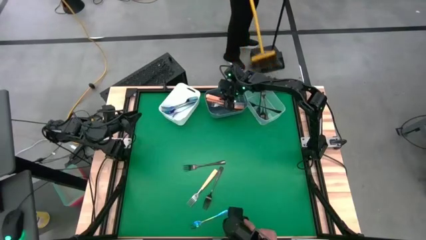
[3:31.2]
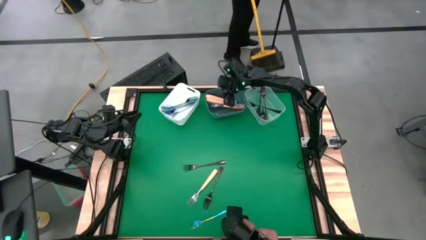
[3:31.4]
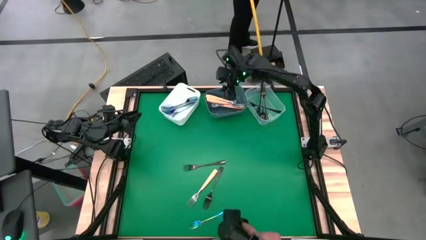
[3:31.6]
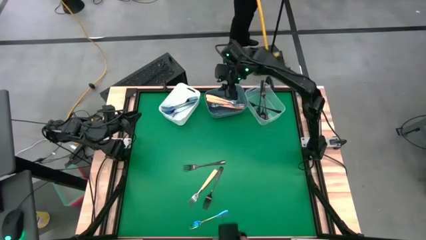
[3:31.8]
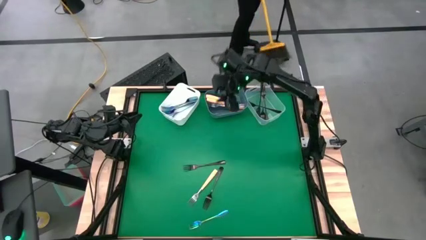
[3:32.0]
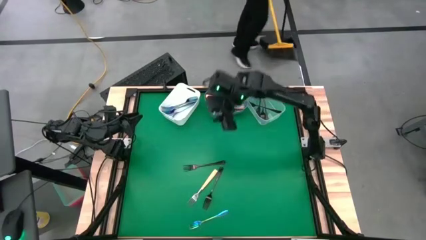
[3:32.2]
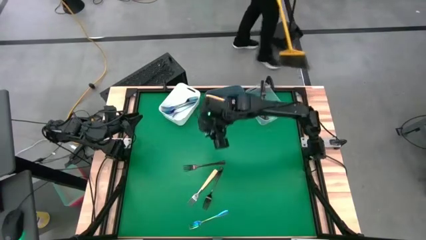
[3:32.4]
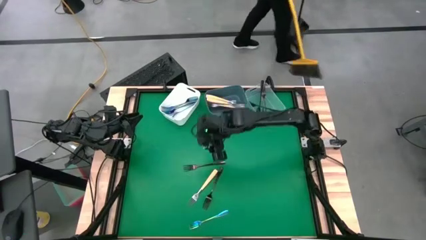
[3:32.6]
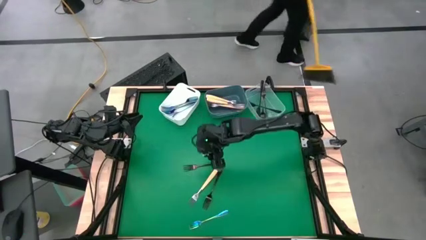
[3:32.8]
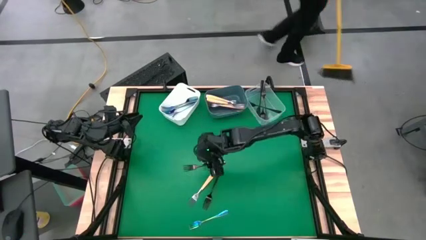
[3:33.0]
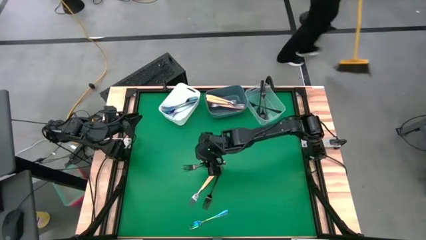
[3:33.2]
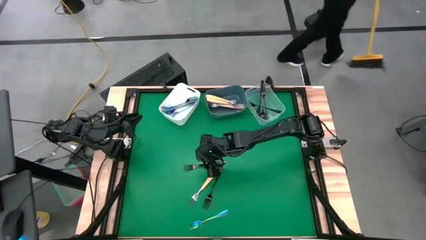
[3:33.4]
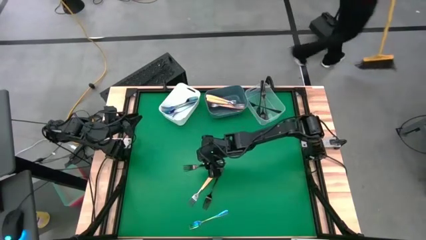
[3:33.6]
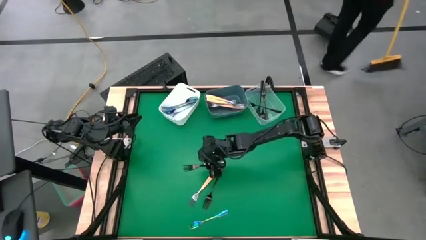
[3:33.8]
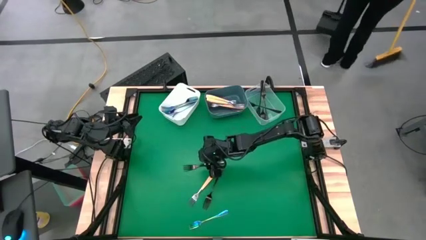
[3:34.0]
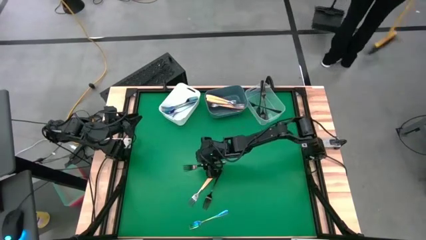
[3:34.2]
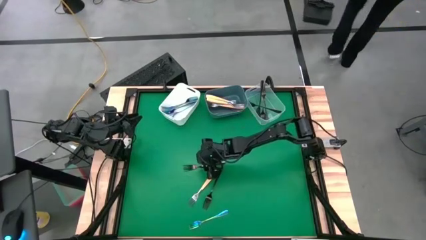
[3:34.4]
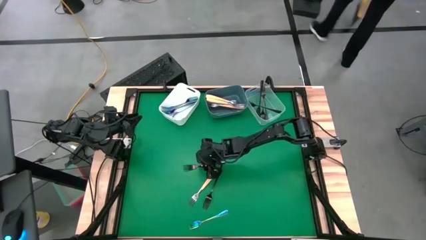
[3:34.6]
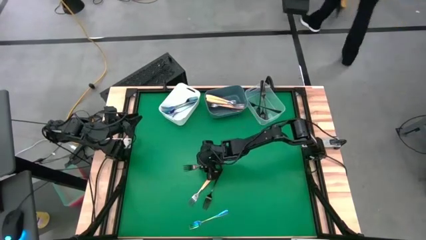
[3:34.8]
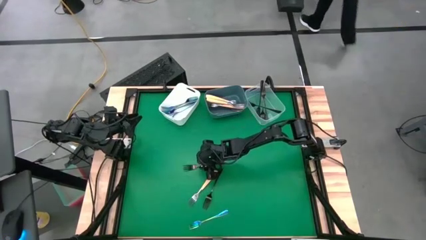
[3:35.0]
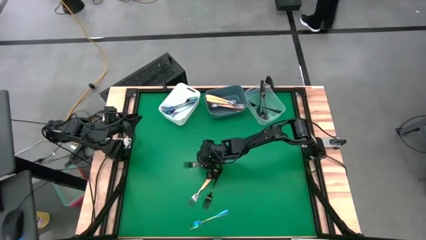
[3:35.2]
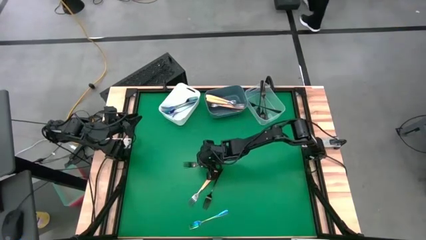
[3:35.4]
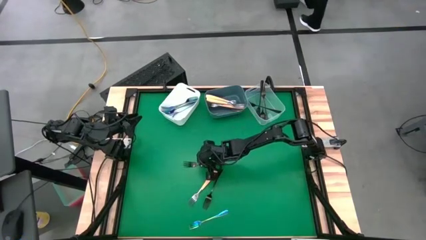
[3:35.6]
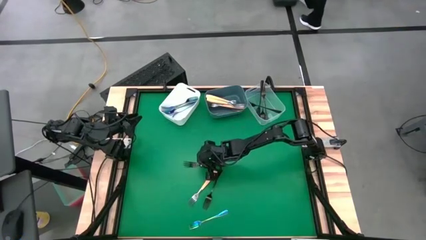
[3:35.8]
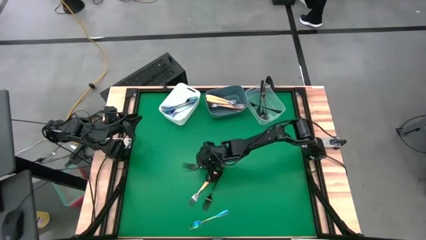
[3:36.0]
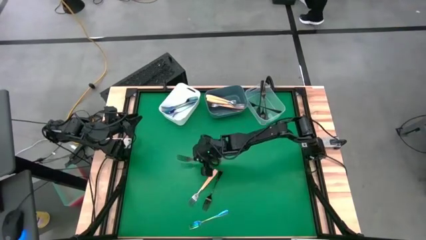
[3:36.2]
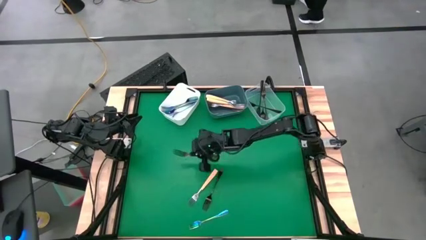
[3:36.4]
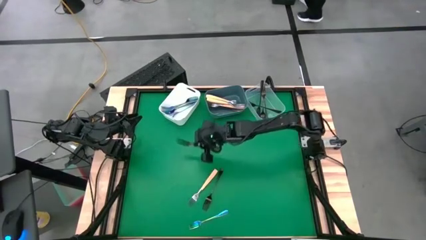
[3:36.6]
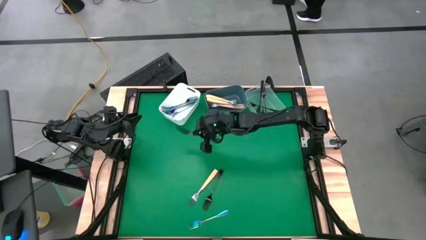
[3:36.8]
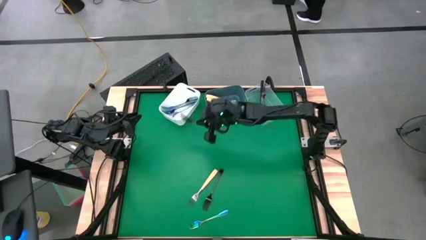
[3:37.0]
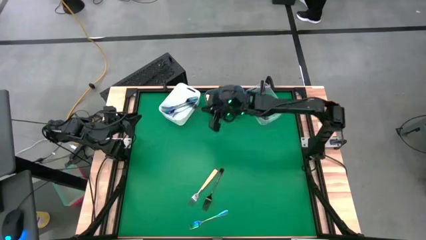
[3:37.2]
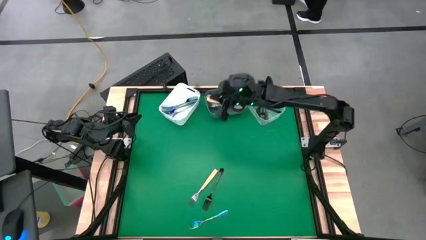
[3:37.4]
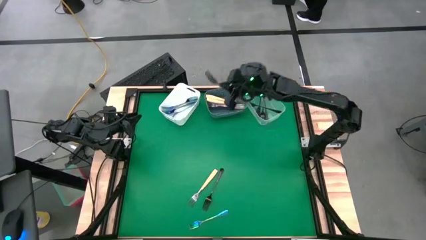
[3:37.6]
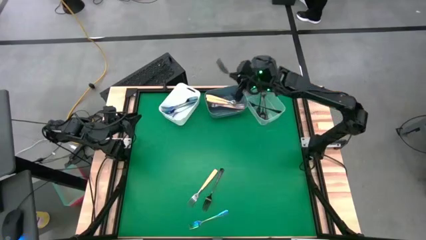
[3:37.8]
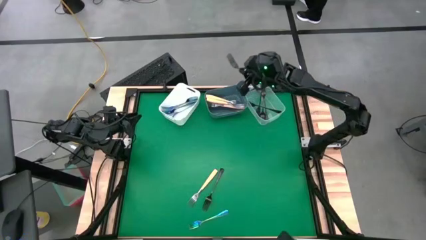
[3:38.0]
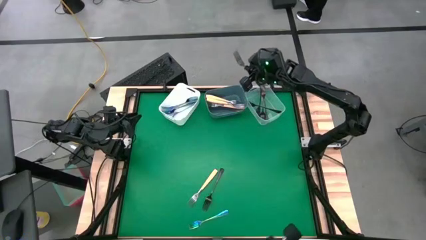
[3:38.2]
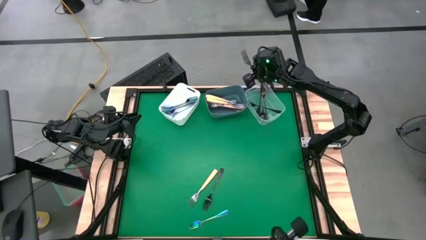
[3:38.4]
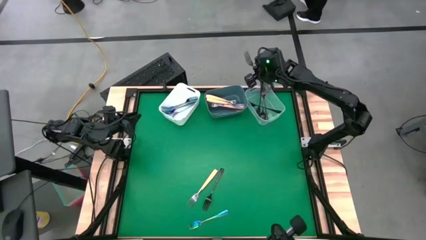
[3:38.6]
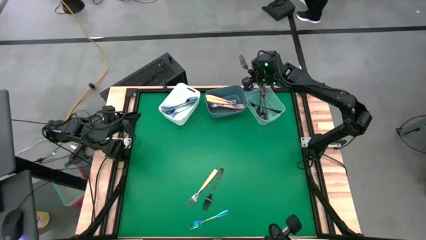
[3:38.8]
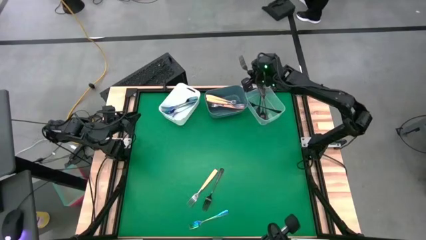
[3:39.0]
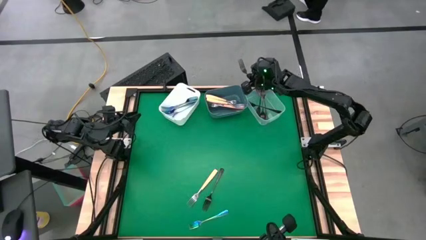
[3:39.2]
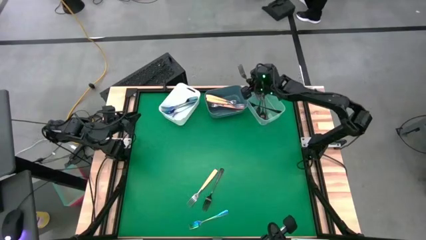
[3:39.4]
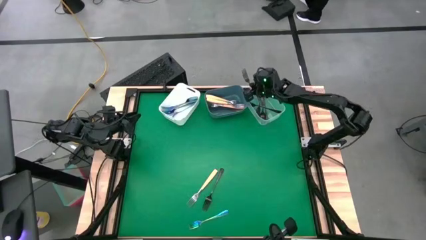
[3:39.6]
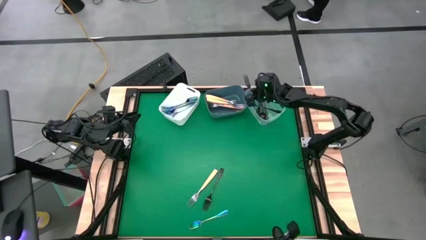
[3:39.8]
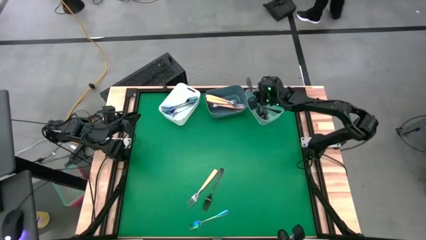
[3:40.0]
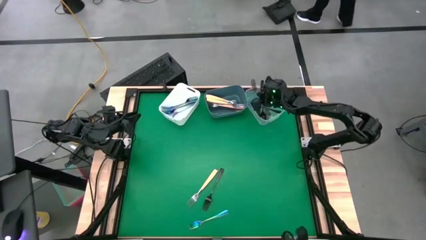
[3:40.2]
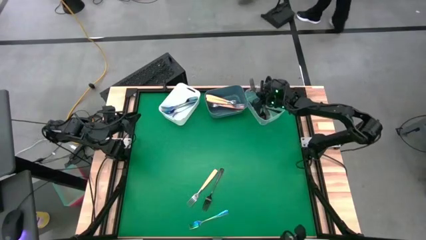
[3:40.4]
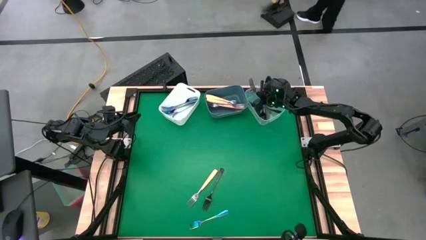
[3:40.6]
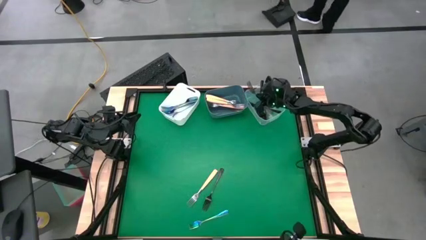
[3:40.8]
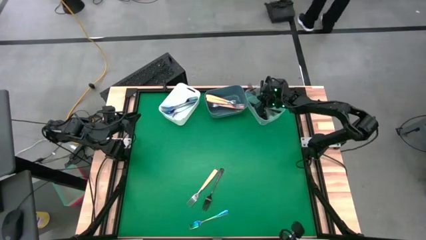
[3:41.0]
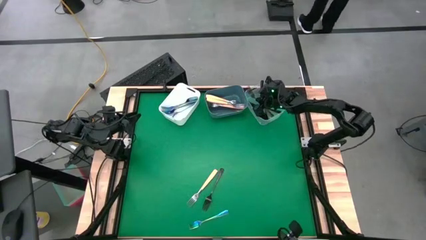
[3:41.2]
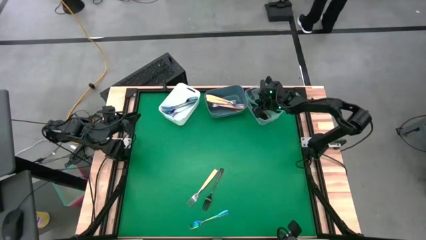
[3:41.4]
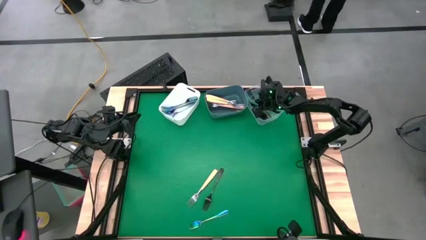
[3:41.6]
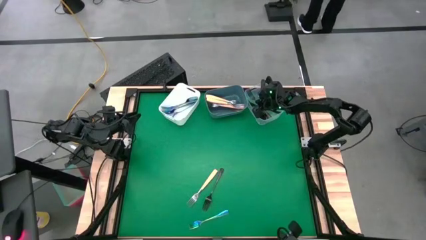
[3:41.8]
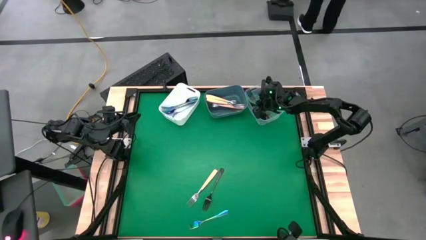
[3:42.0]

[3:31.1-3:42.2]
Task: Sort silverware by color (type)
Put the black fork into the transparent bin

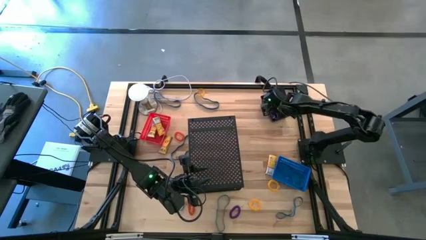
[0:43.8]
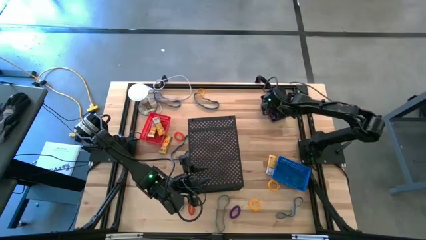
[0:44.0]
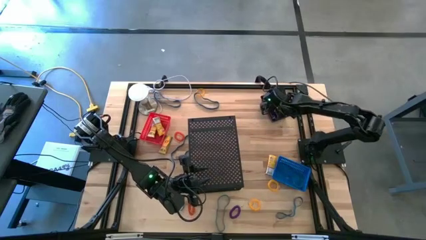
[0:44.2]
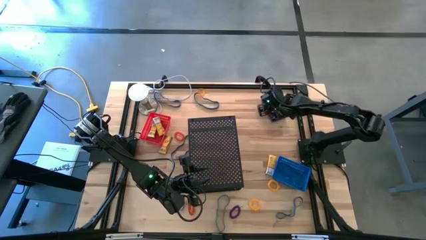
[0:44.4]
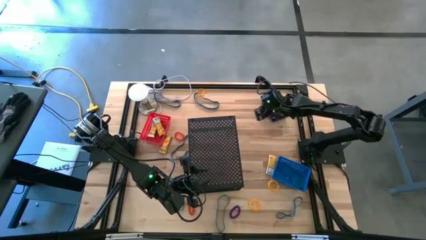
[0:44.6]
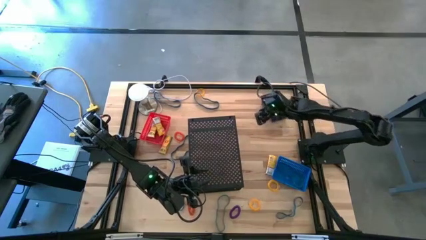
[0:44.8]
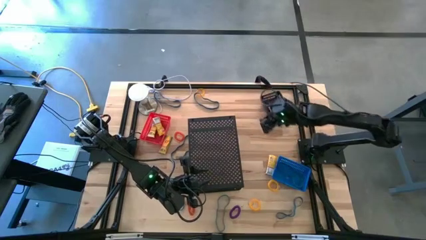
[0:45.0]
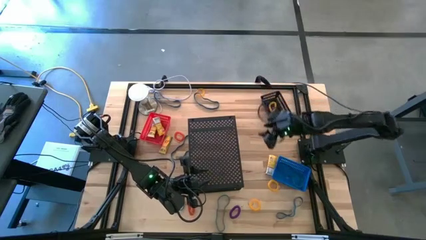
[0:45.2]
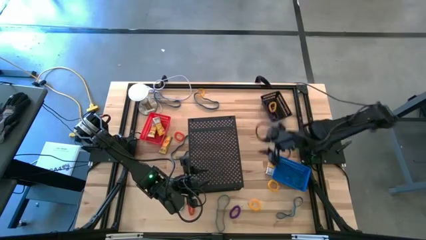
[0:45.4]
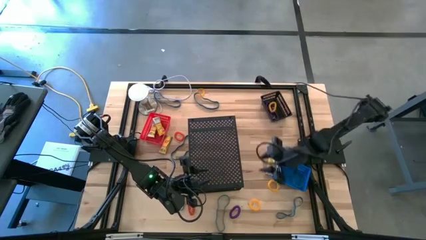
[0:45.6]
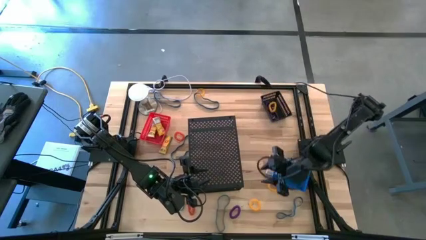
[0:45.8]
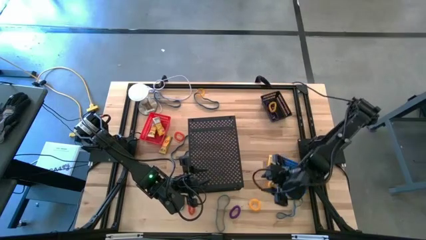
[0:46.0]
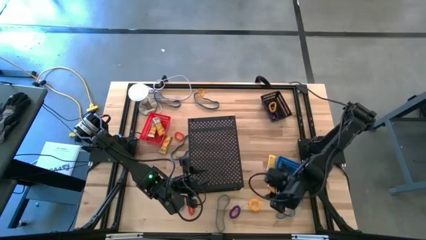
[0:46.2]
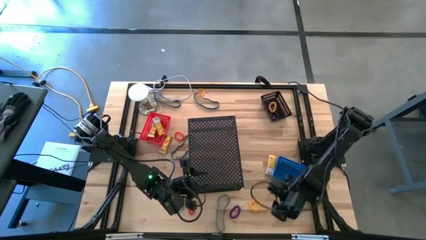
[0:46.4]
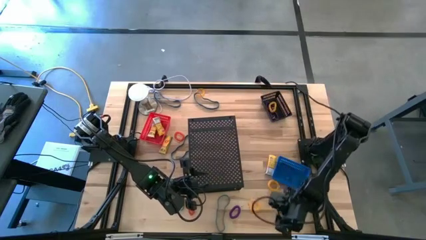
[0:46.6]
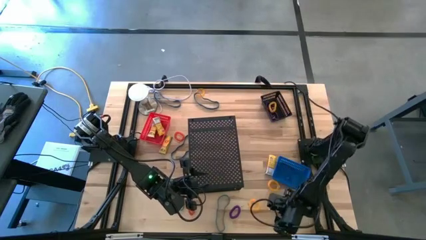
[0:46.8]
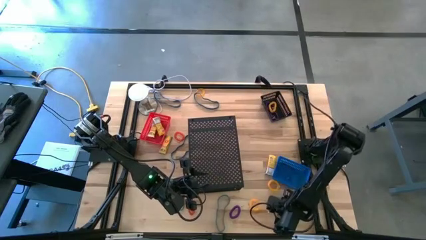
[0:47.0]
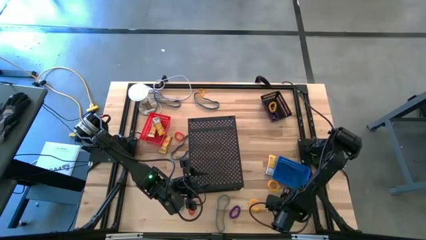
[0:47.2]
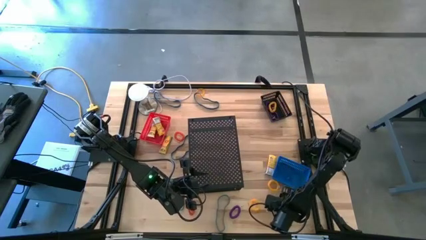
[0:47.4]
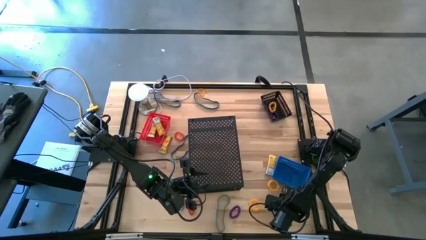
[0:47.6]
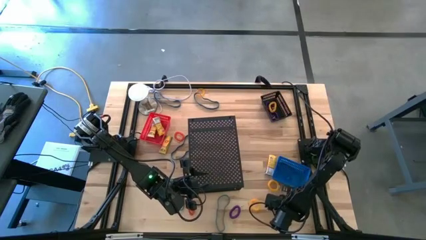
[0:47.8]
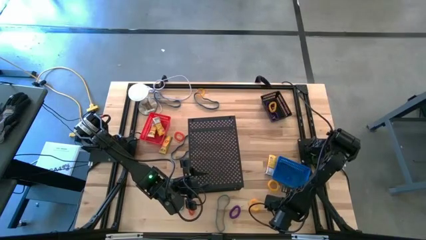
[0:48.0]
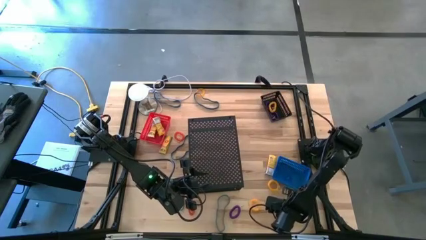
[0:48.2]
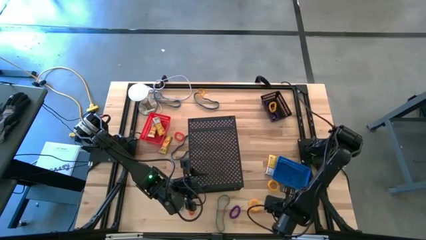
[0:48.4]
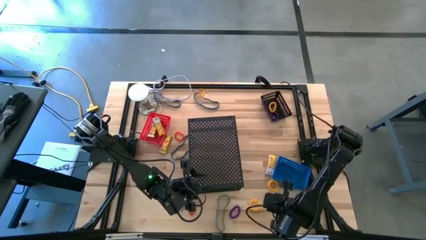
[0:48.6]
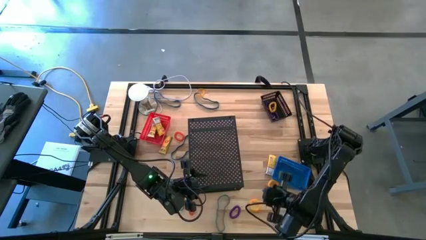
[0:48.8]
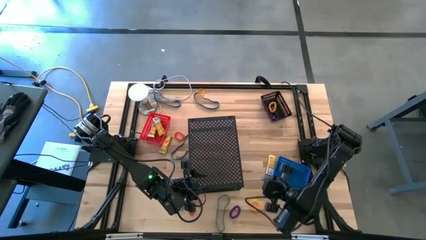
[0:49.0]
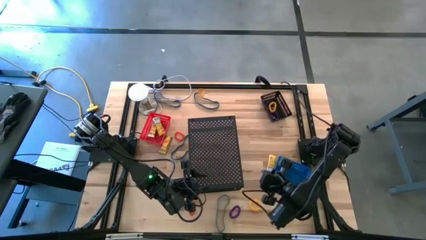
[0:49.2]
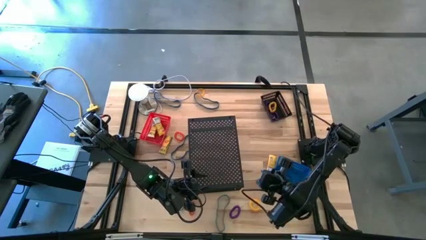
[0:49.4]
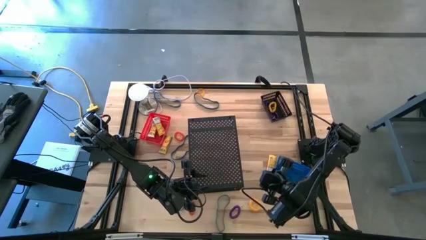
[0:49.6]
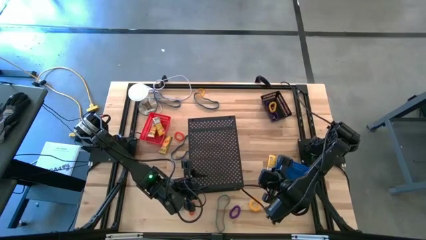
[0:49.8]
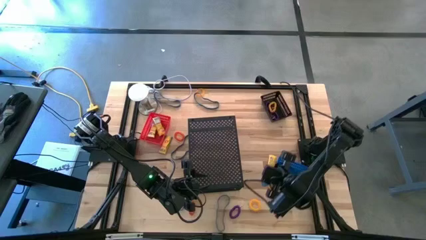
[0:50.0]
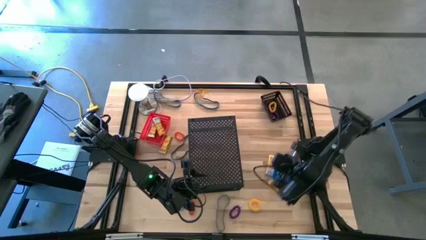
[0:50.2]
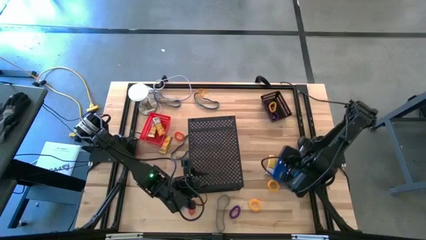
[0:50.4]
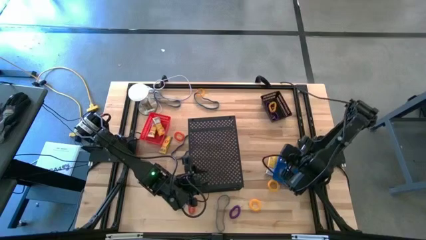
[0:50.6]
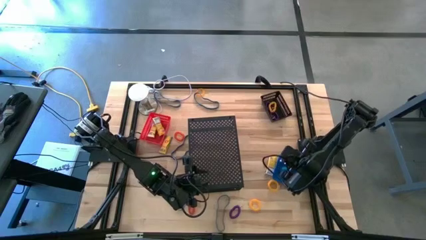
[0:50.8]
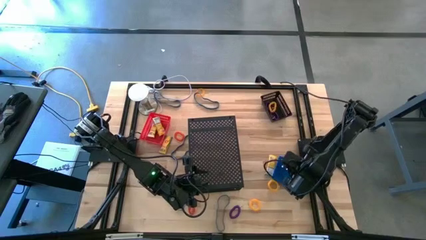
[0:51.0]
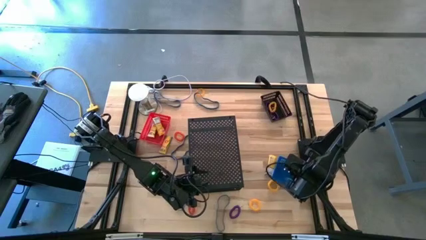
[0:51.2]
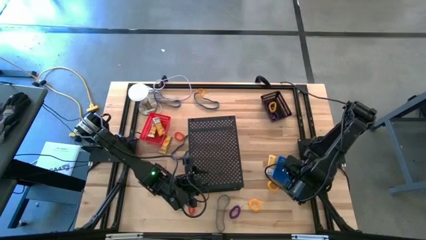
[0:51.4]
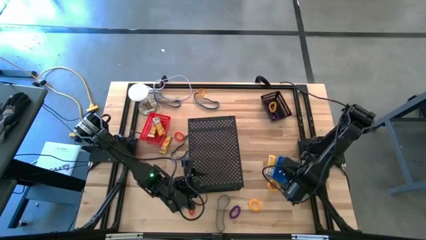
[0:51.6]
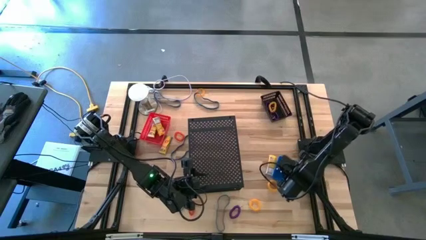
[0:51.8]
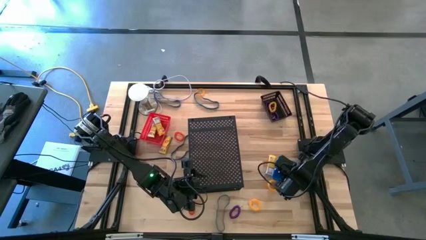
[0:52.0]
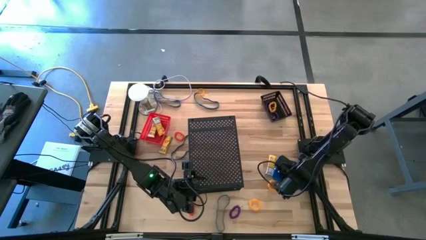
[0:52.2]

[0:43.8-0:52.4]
Task: Pick & Place Office Desk Supplies
Put the blue rubber band into the blue bin
